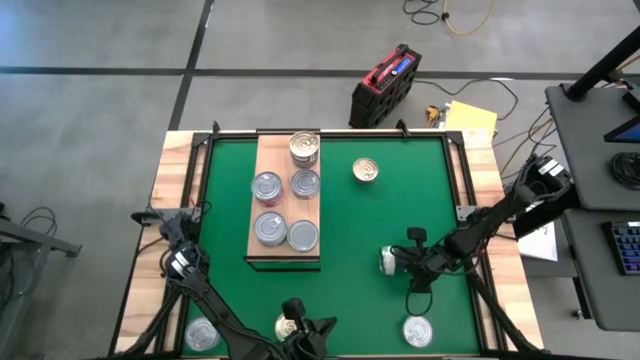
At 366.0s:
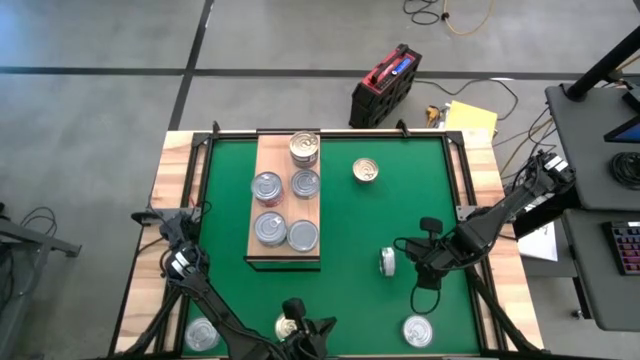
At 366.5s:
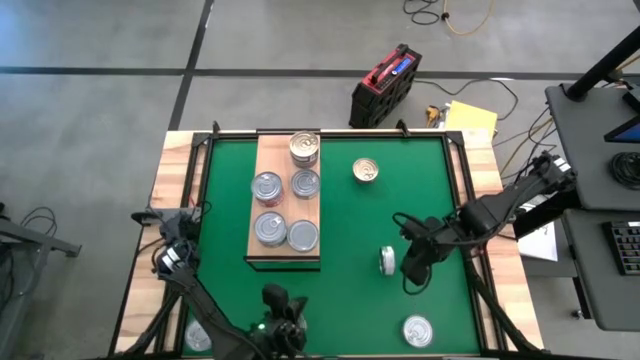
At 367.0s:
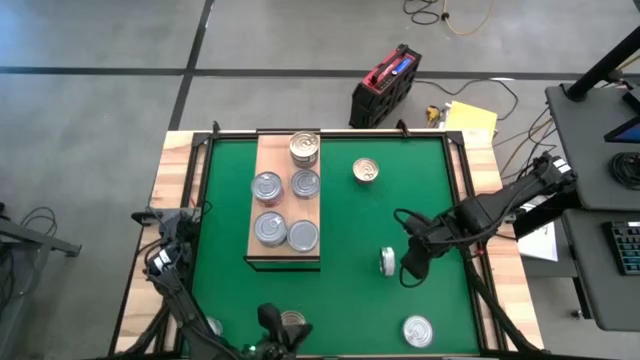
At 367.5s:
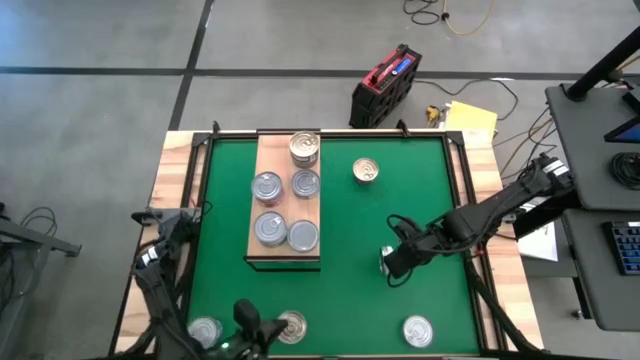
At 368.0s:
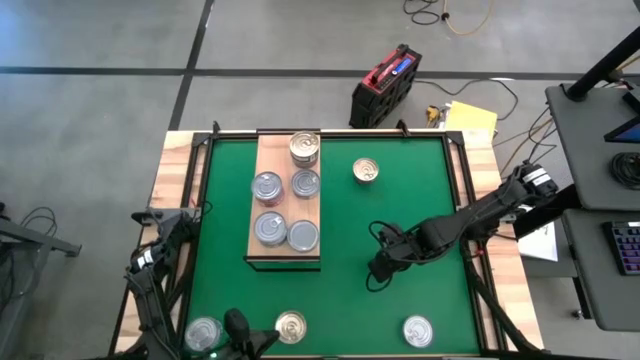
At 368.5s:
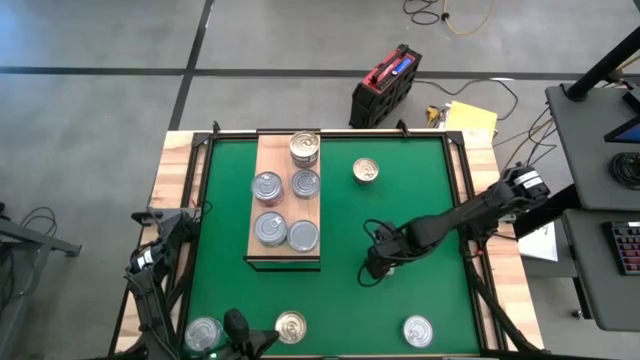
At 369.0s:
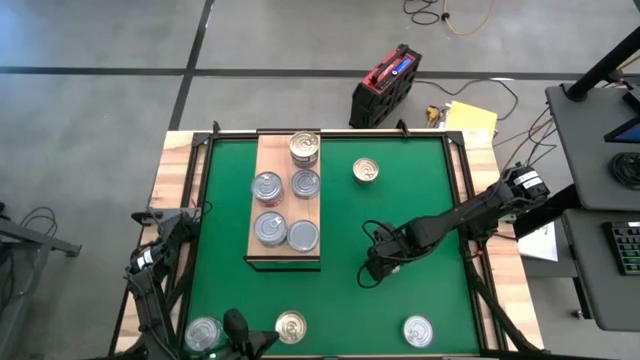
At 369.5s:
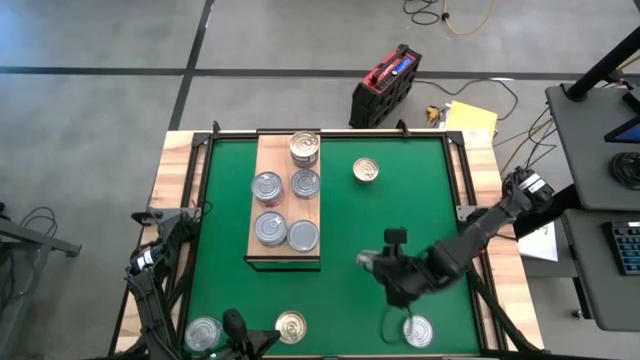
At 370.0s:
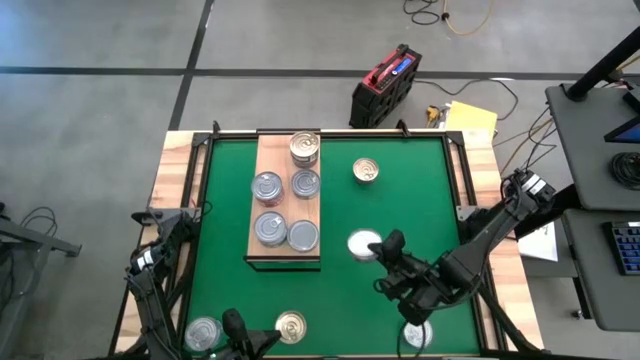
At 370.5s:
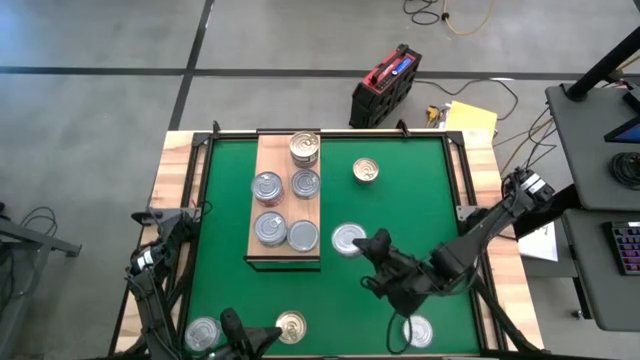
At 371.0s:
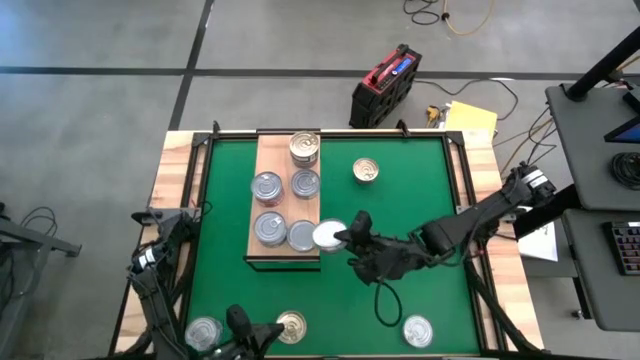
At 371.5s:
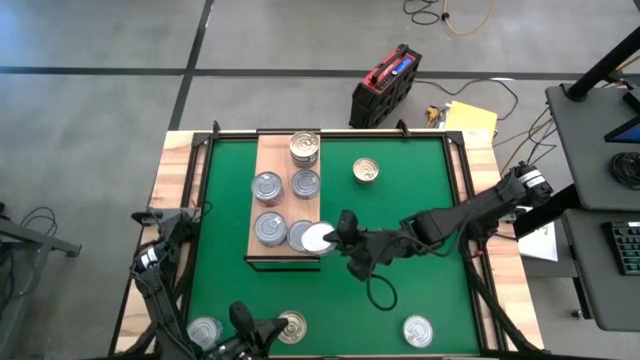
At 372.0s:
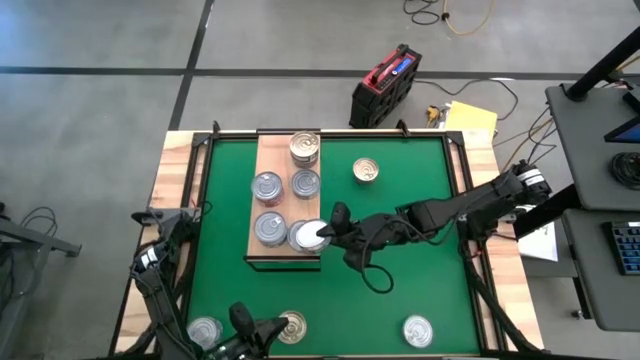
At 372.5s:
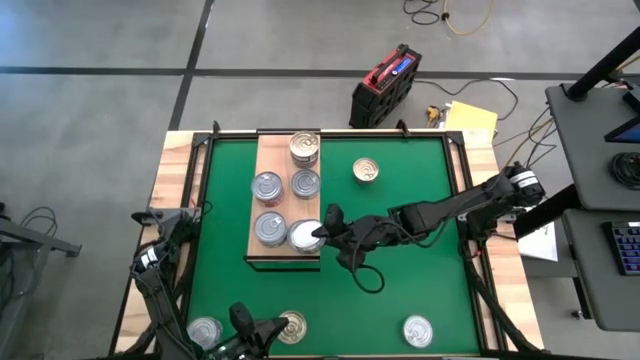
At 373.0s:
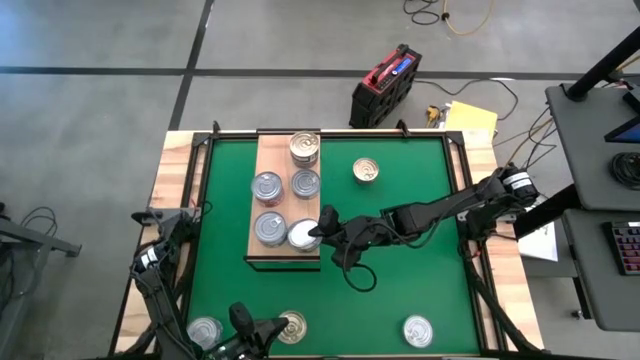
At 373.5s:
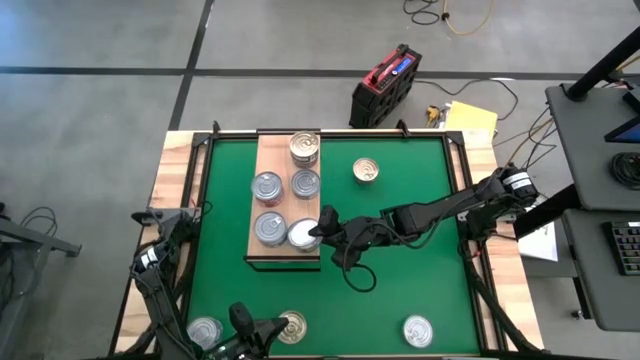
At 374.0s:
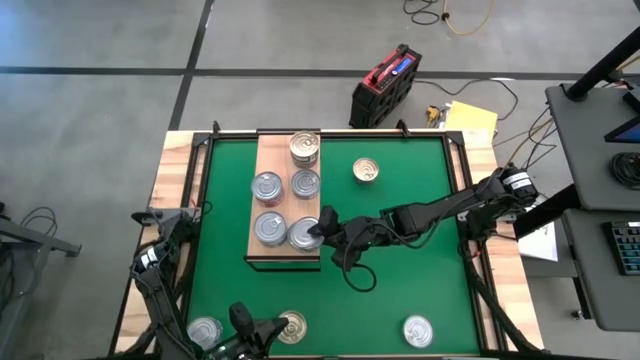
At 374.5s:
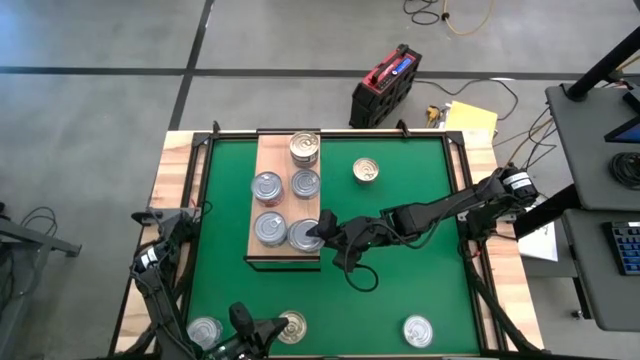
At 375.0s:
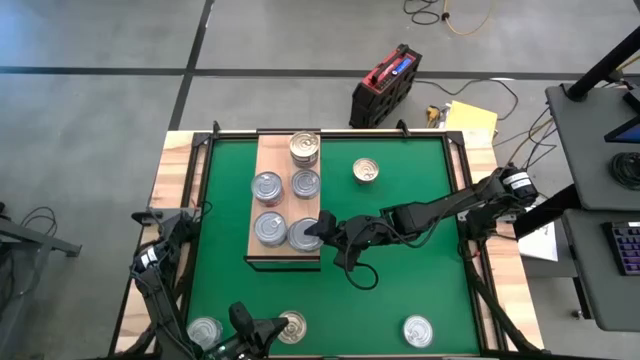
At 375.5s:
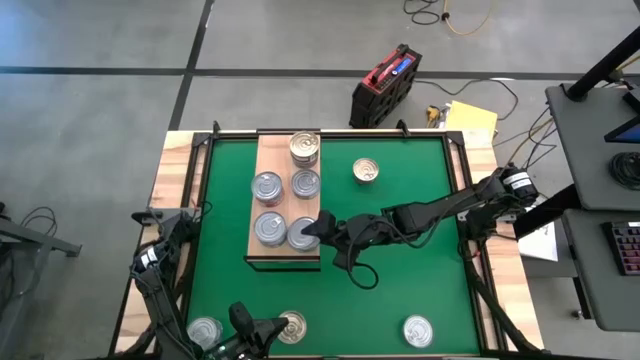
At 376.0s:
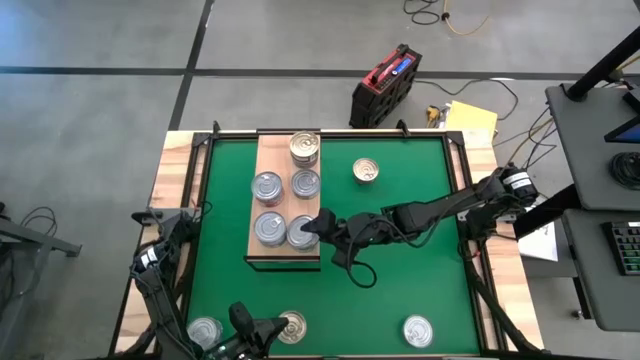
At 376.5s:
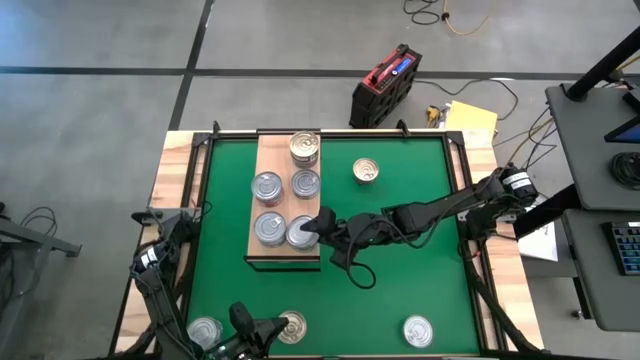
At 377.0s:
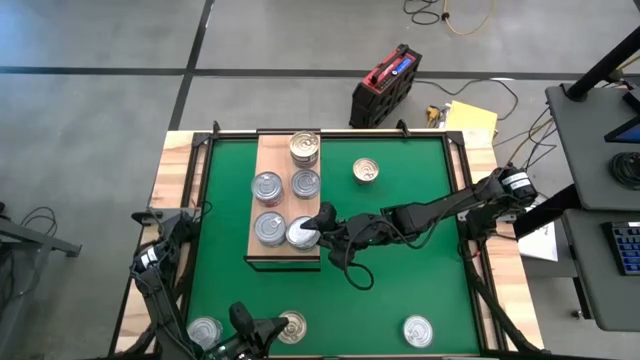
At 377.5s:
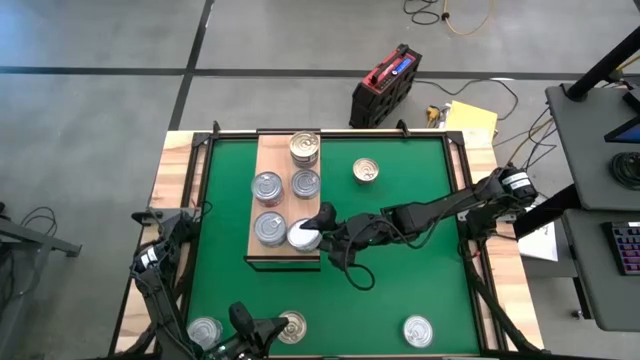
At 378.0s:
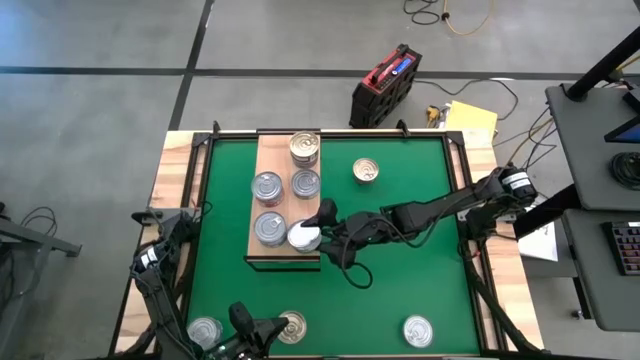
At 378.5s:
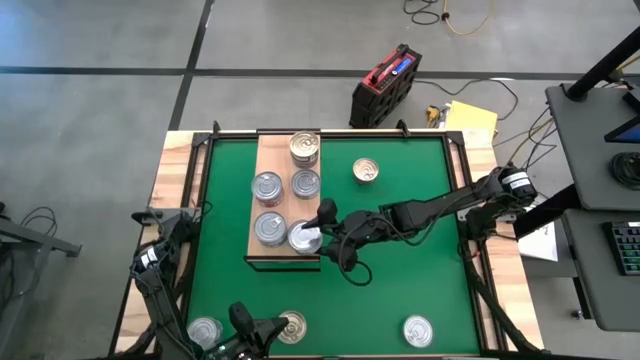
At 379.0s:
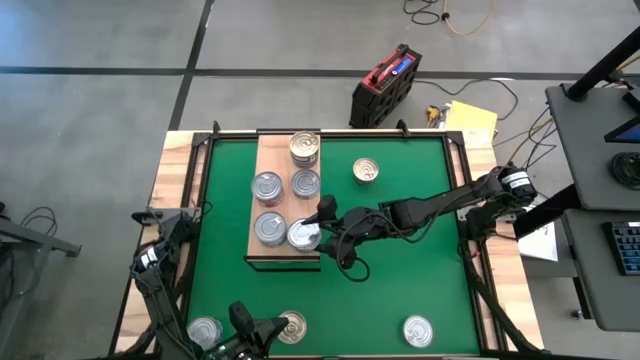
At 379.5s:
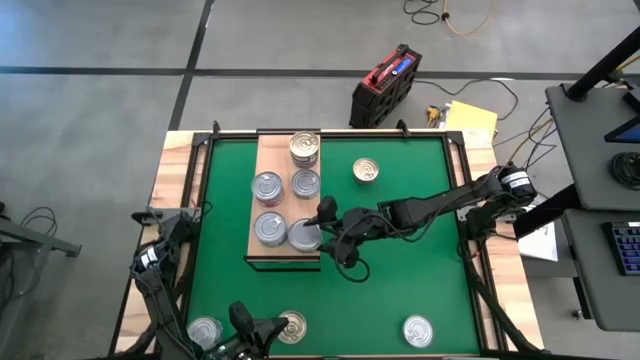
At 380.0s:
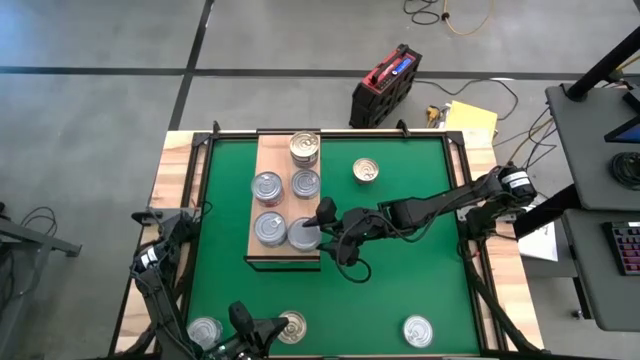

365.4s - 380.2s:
Task: Stack canned seafood by type on shelf
Stack the green and white tuna can on top of the green and white tuna can on the shelf

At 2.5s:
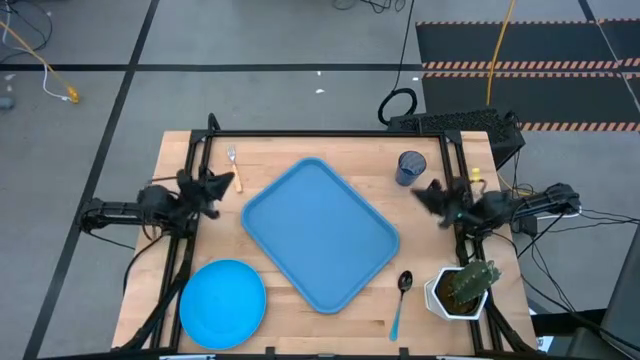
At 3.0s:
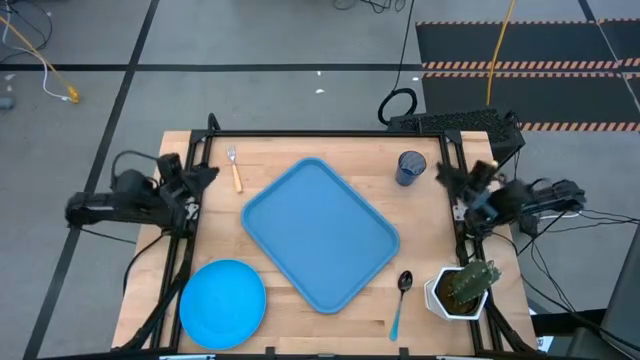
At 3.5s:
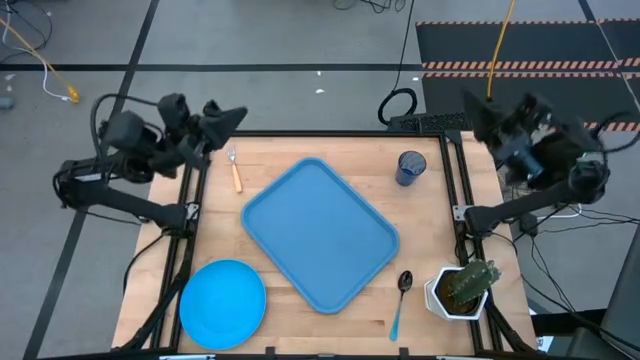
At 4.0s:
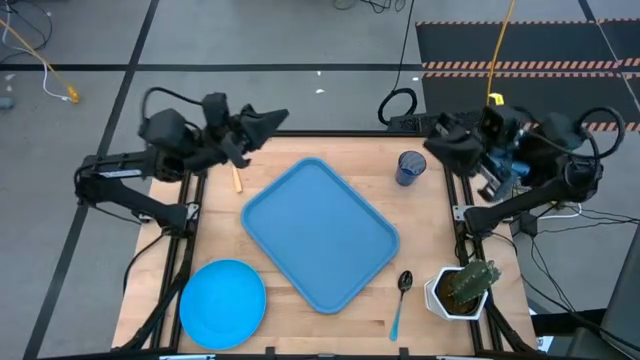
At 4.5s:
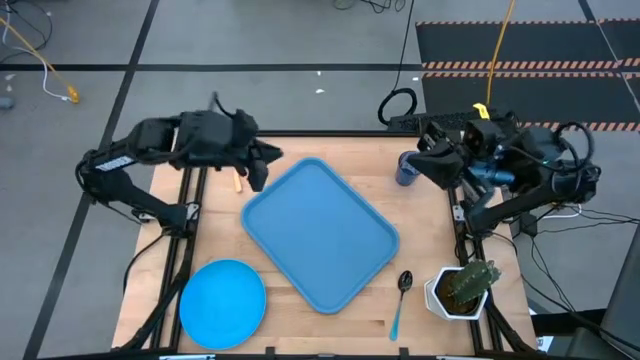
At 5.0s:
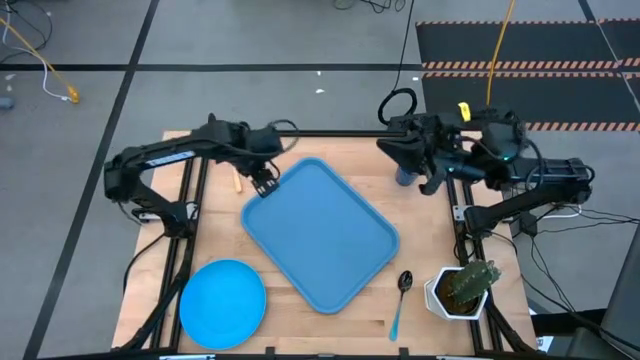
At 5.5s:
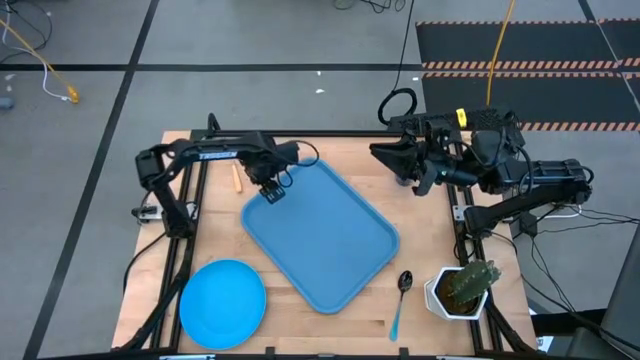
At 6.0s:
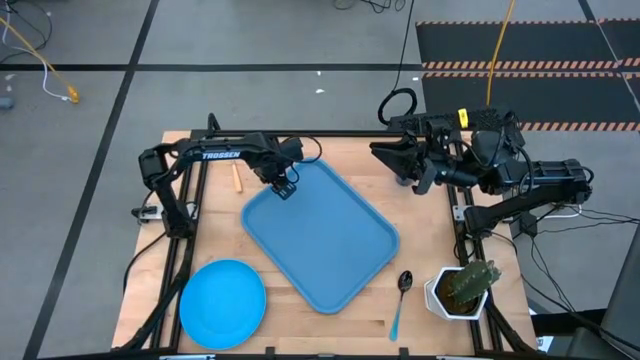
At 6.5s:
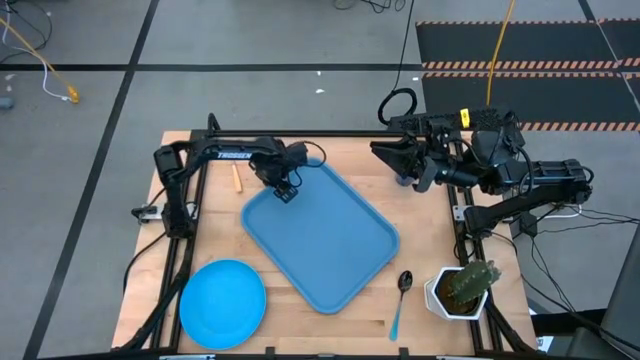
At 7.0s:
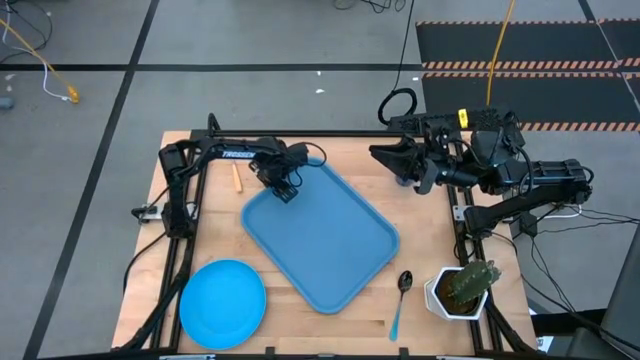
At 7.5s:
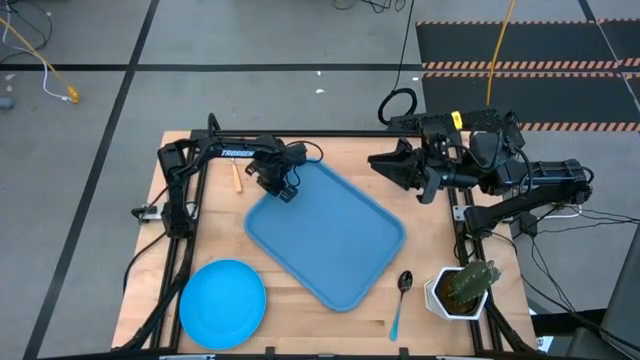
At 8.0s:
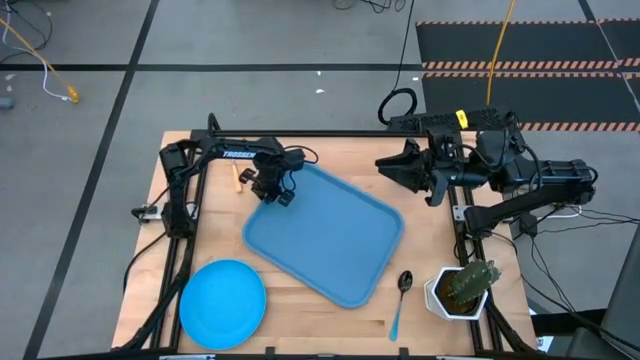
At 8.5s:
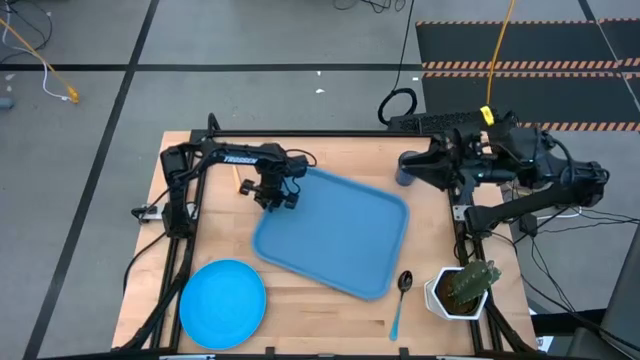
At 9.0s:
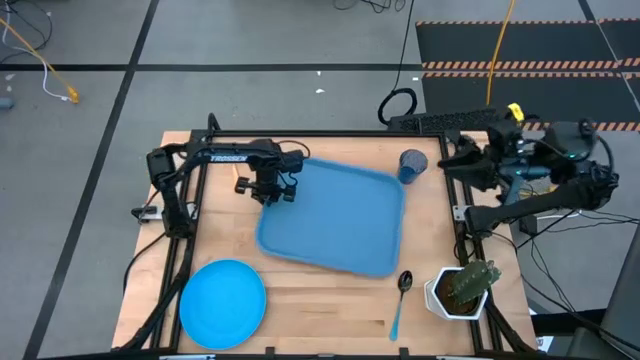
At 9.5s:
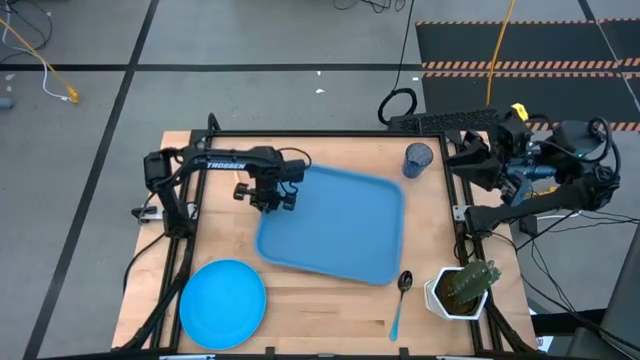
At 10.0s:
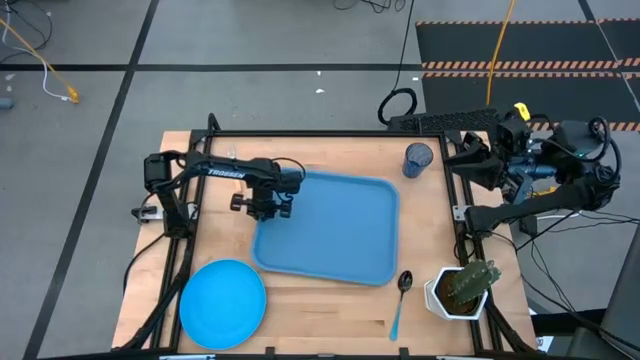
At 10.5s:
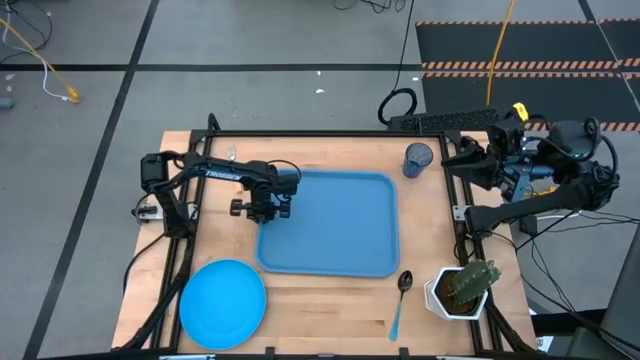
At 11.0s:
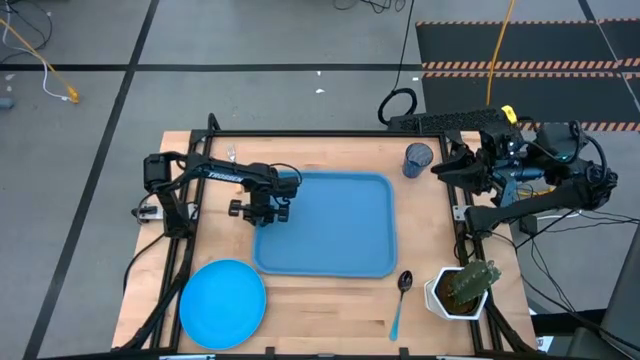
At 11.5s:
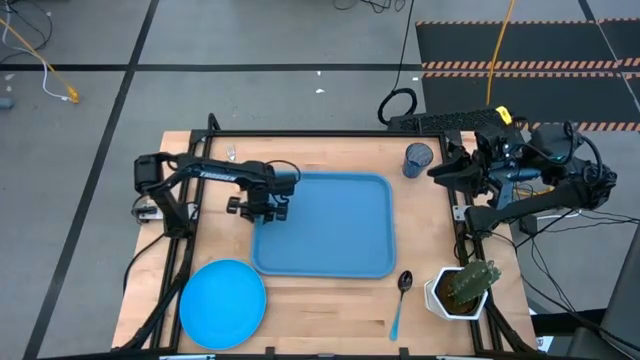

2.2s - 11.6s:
Task: Pick and place plate/cup/fork/spoon on tray
Prepare the blue tray
